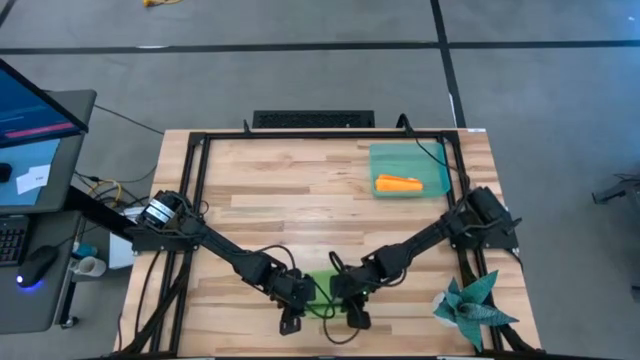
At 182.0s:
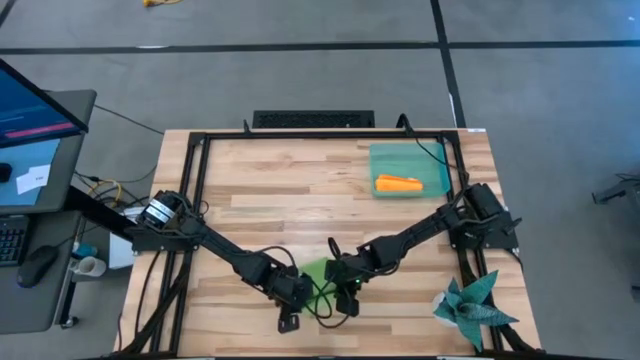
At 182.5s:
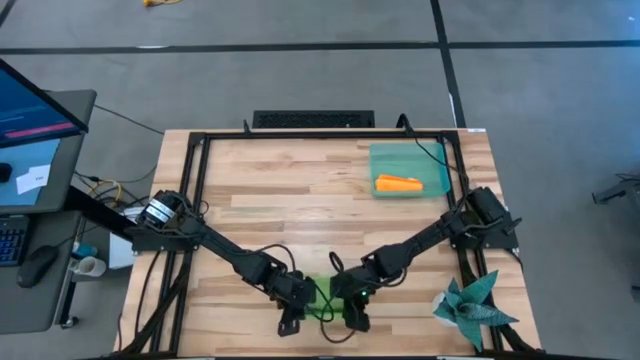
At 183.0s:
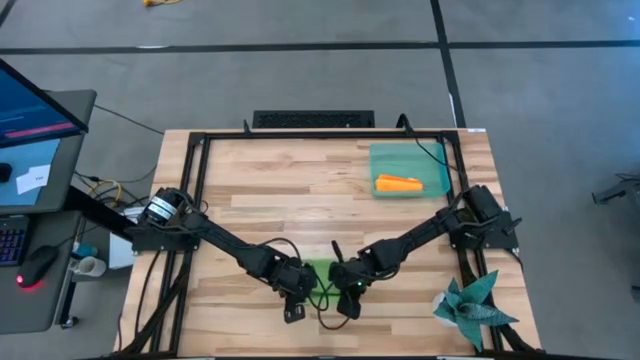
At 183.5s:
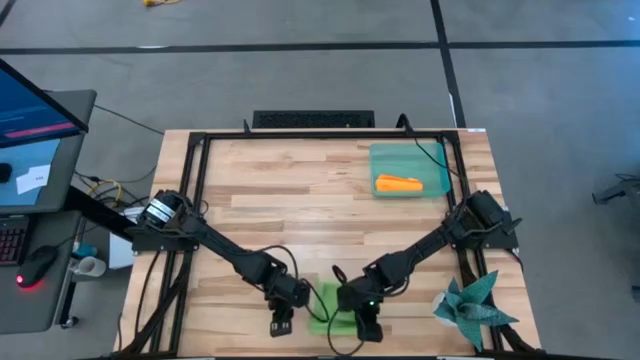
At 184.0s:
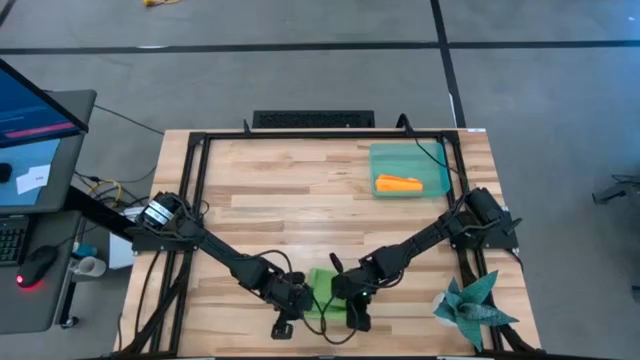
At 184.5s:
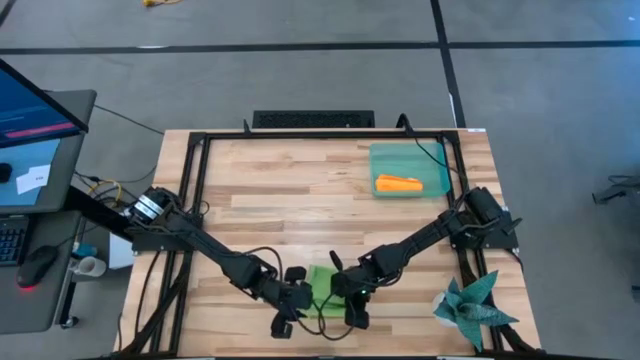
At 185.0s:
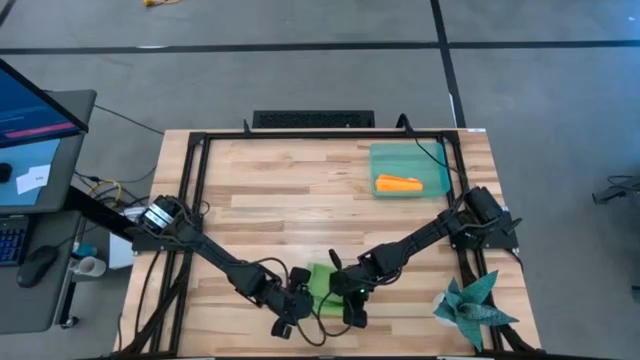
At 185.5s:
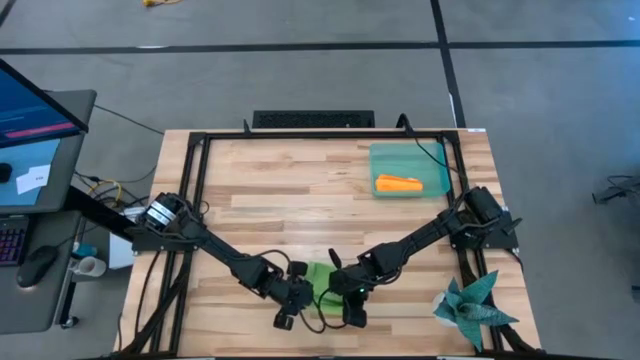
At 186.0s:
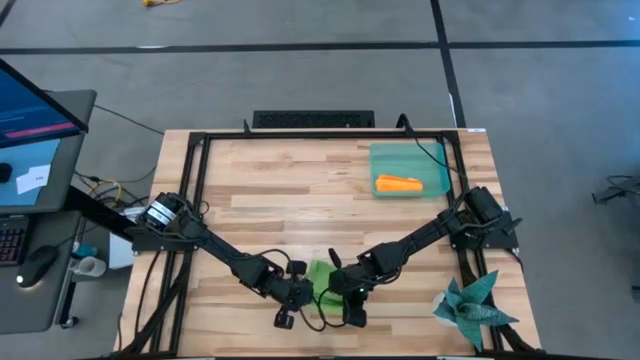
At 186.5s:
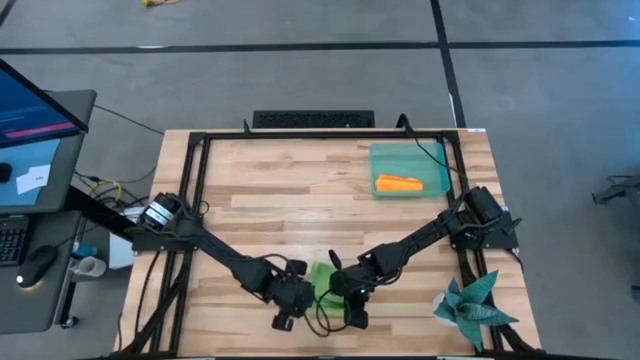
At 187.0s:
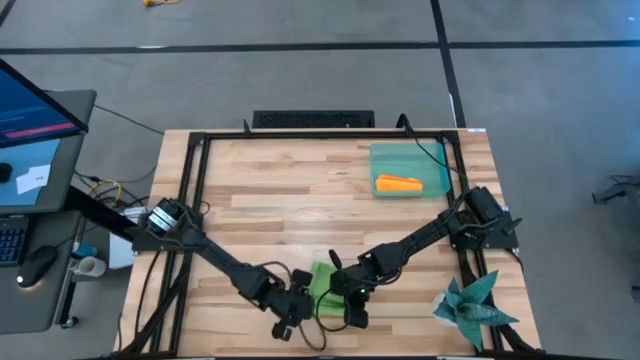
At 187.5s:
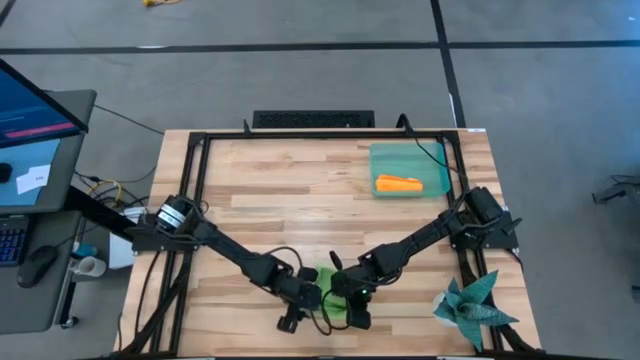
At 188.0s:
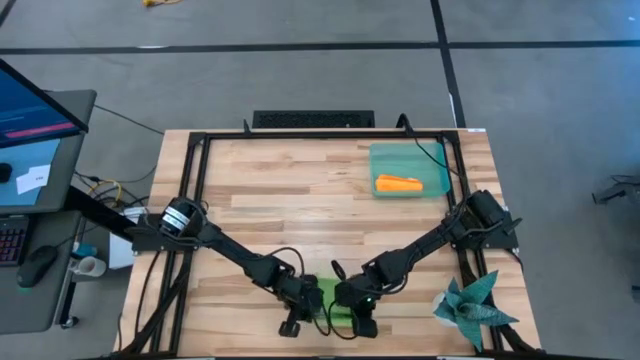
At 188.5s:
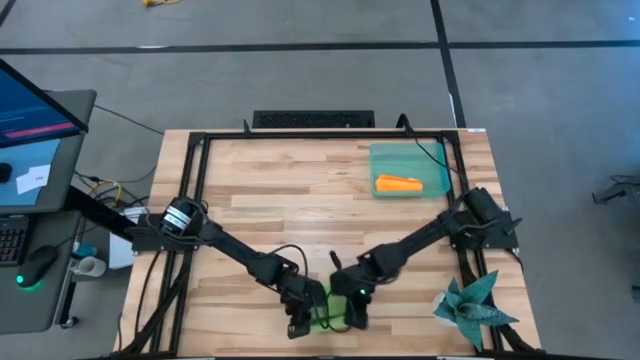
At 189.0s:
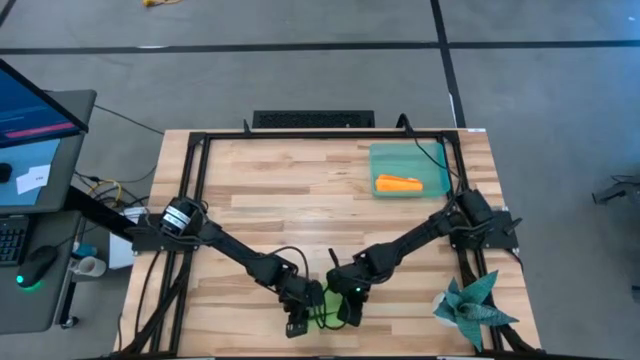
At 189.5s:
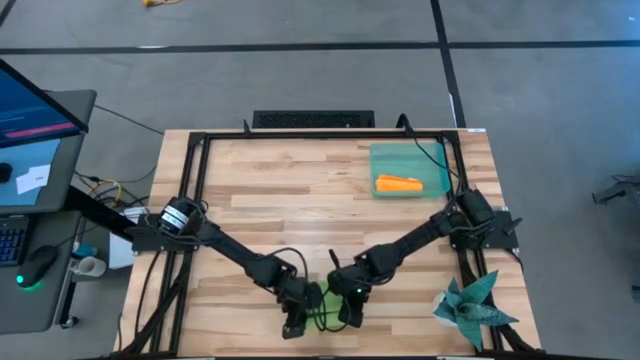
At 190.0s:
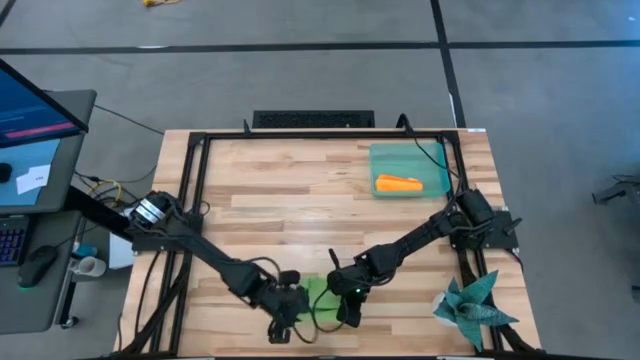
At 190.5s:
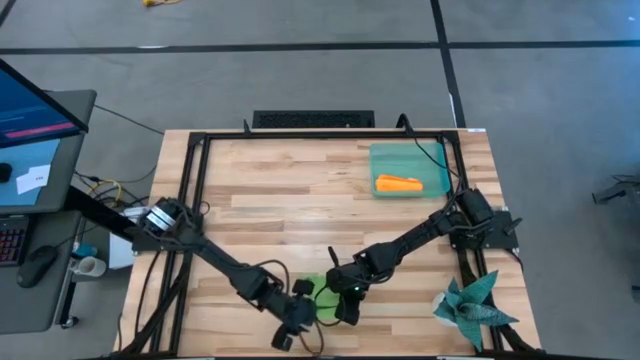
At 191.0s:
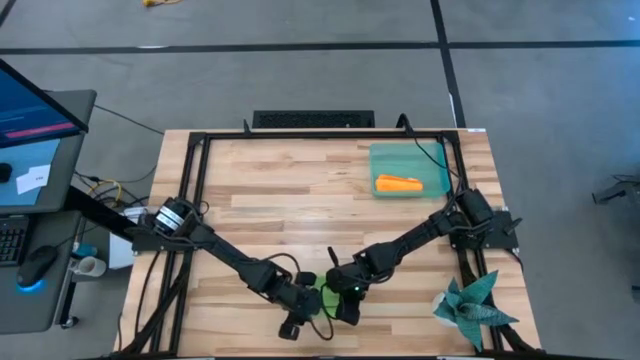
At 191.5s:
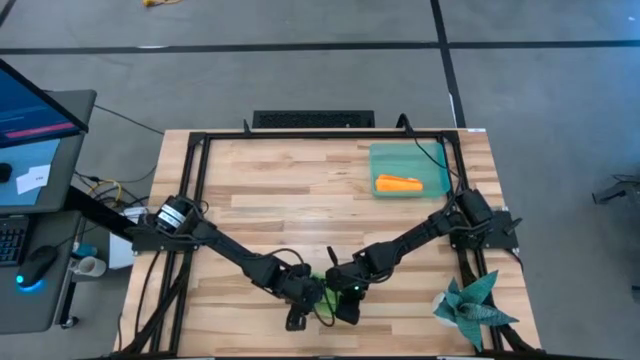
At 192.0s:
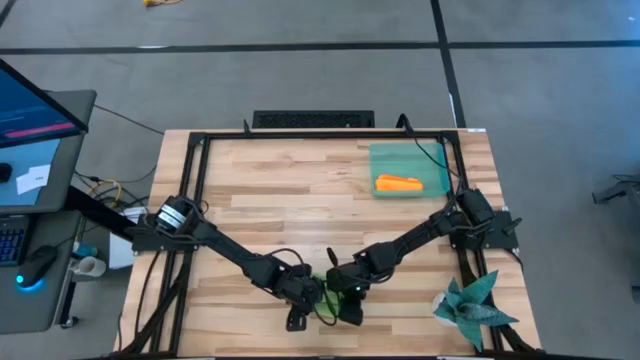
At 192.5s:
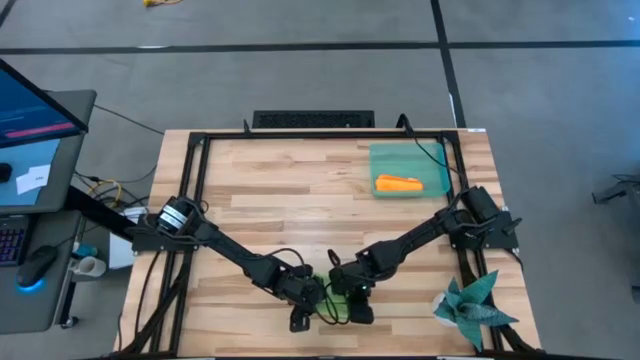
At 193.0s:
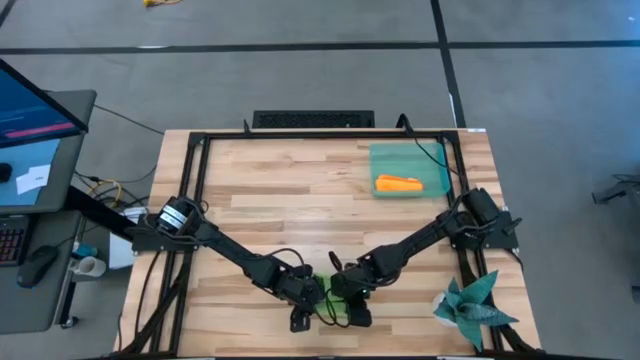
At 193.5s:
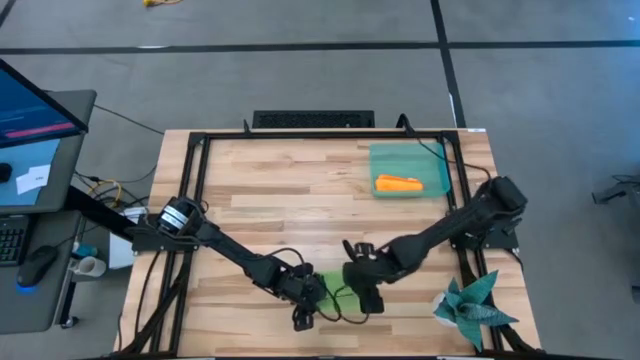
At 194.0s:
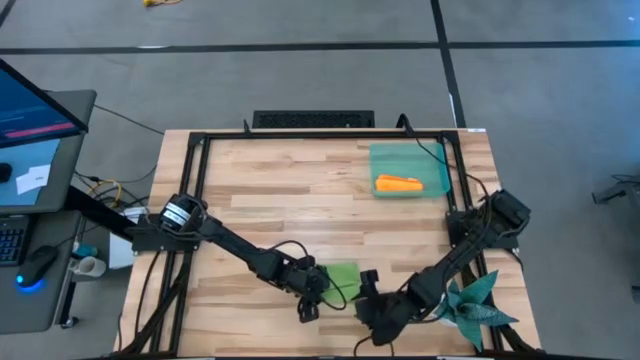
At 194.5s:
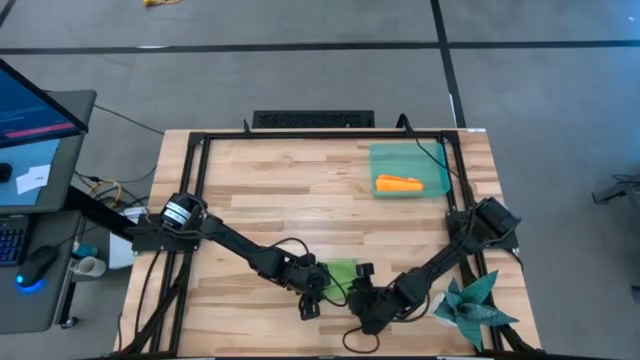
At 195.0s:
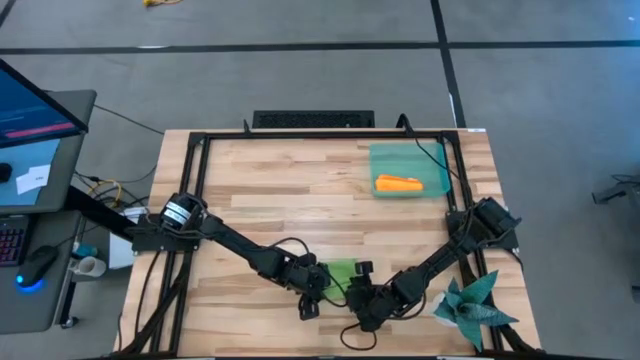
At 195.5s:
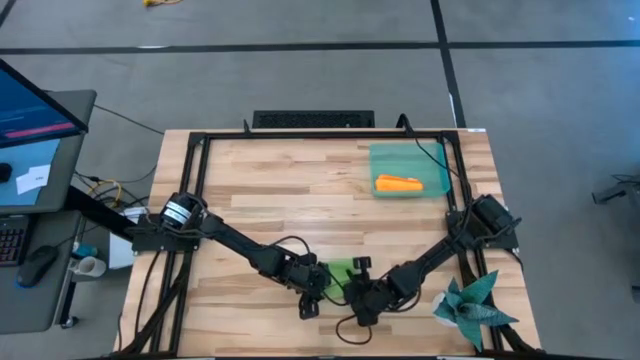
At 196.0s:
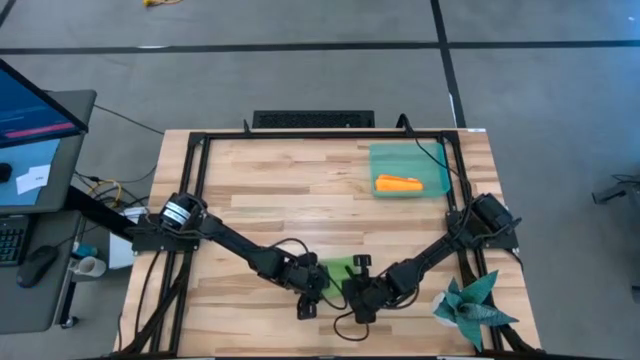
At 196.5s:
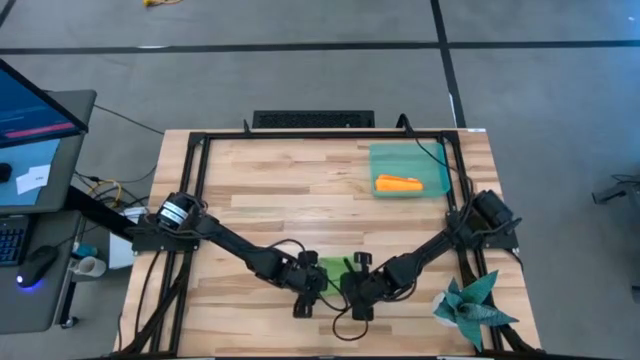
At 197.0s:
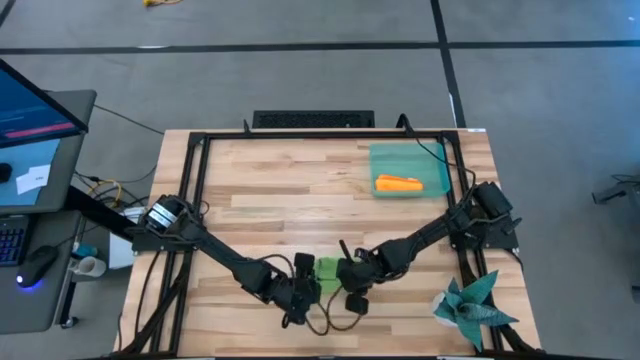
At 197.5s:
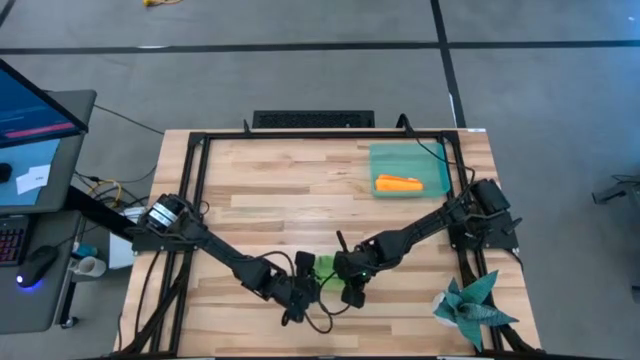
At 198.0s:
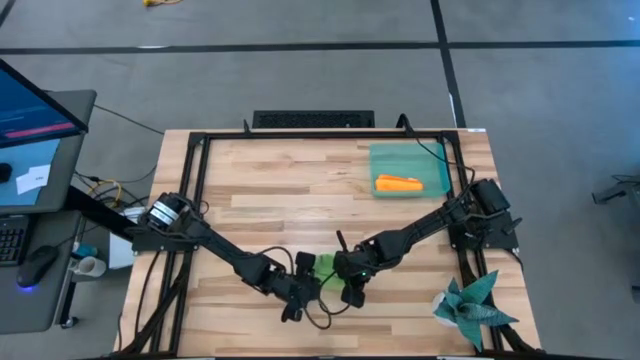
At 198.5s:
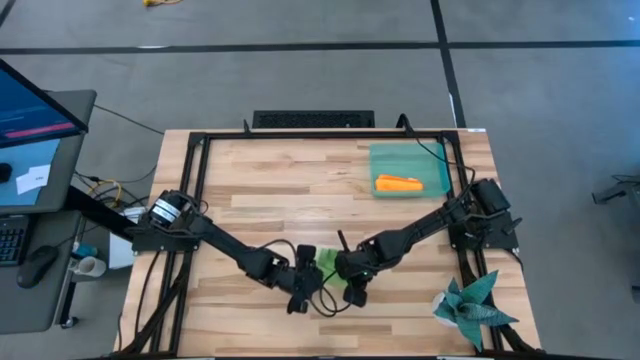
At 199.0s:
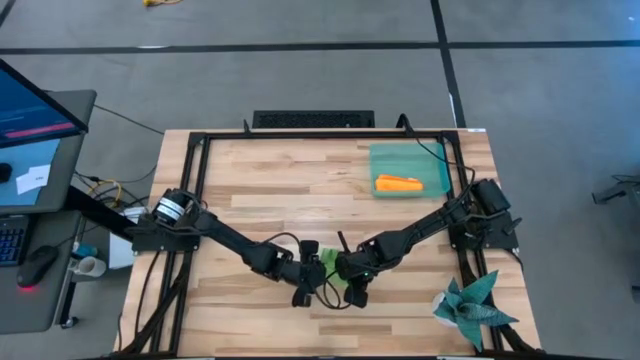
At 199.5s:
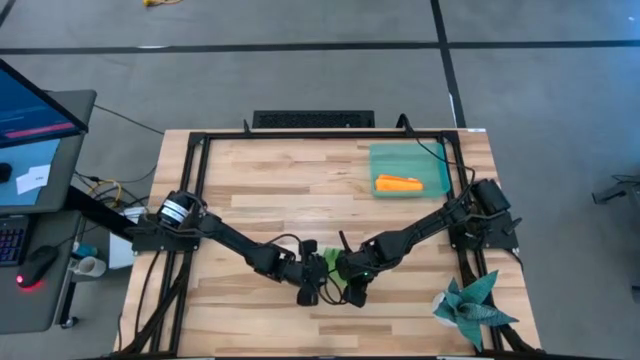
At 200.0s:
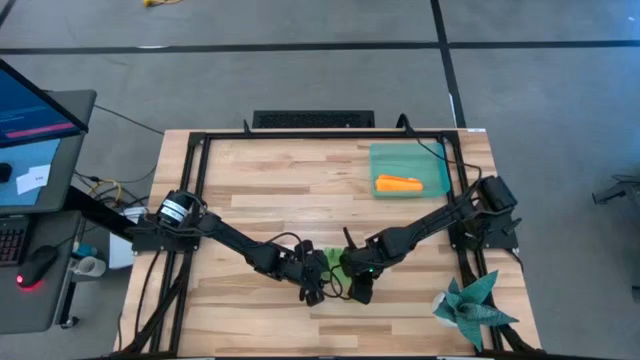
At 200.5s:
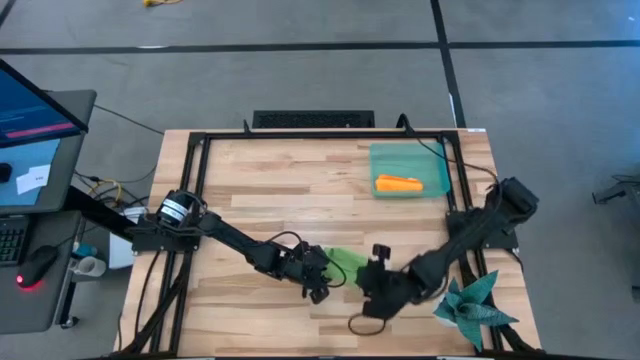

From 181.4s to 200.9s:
Task: Roll microfiber towels into tight, uniform cylinder then place into a basket
Roll the green towel
